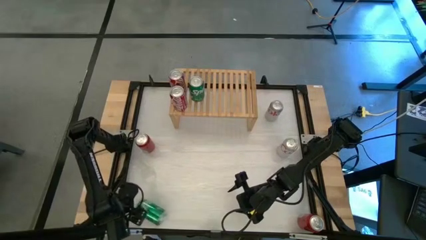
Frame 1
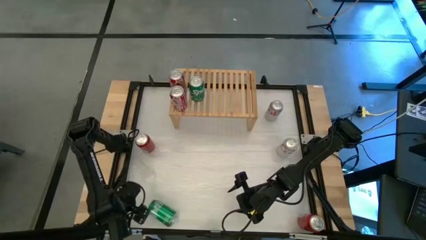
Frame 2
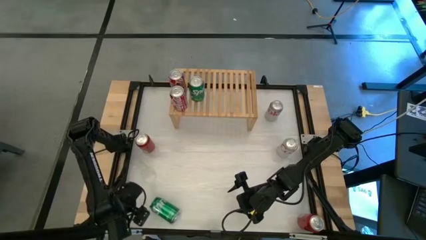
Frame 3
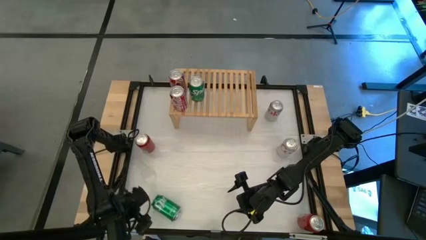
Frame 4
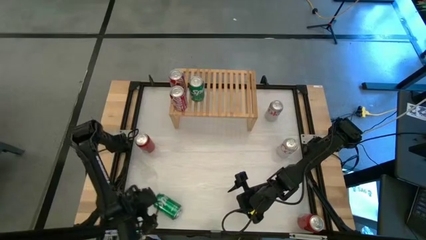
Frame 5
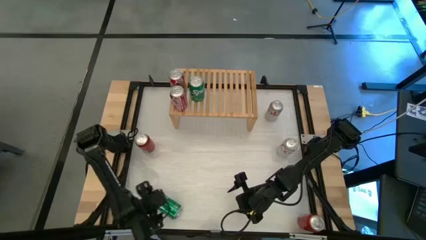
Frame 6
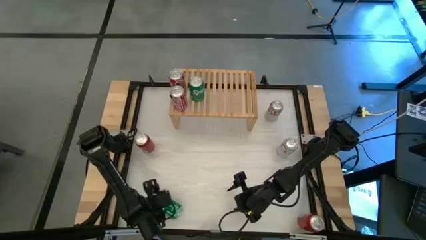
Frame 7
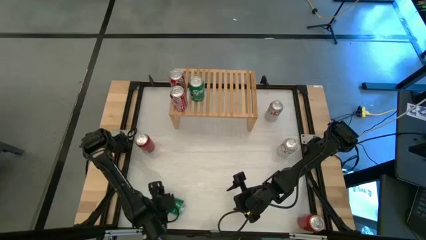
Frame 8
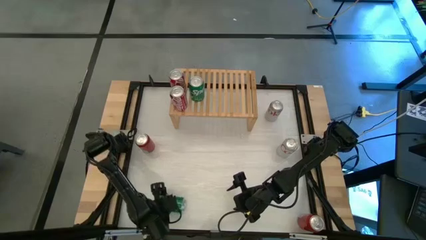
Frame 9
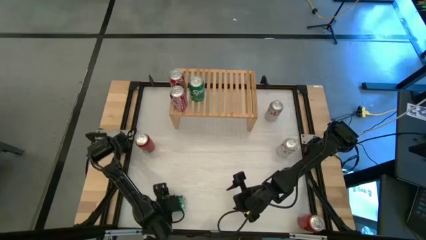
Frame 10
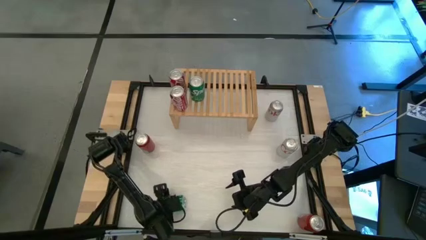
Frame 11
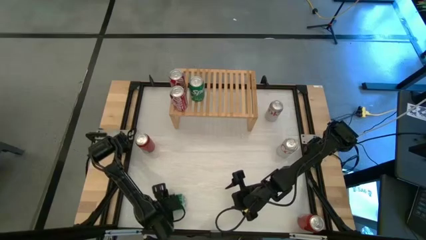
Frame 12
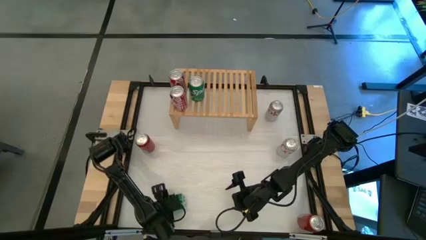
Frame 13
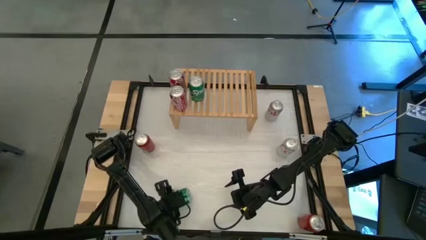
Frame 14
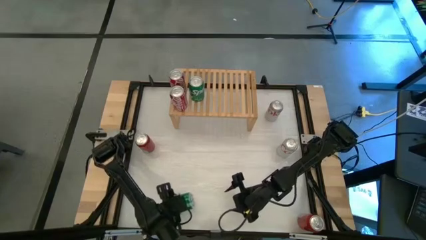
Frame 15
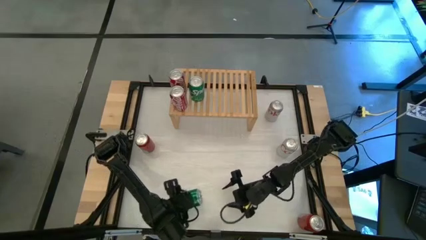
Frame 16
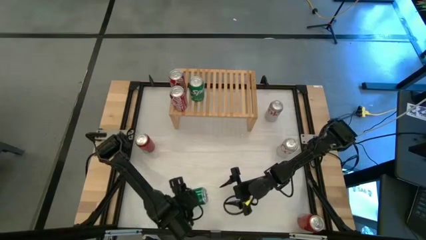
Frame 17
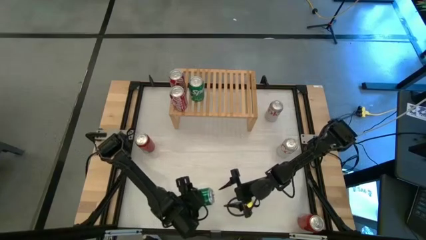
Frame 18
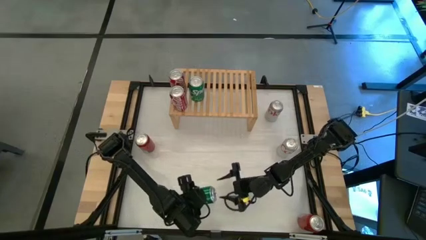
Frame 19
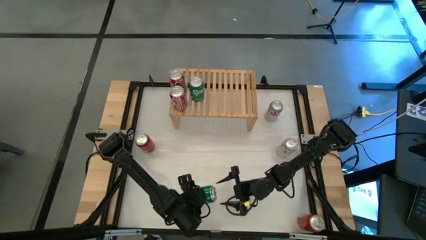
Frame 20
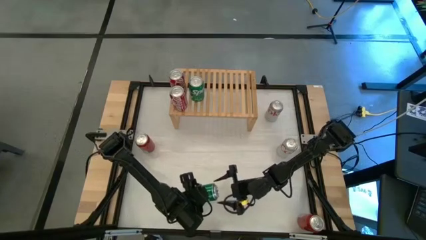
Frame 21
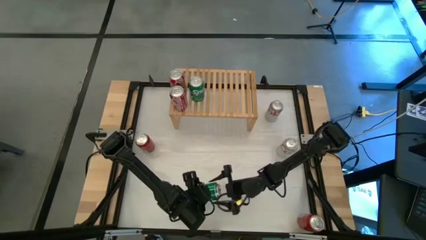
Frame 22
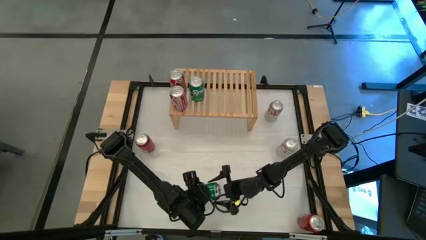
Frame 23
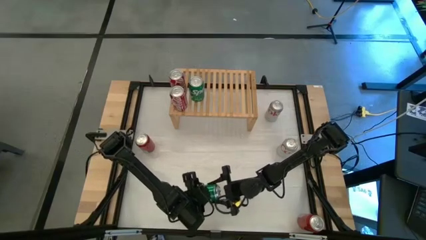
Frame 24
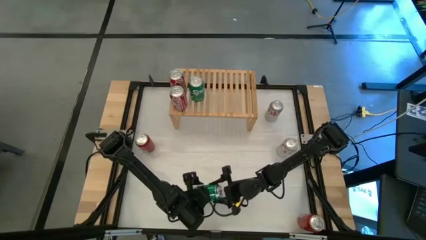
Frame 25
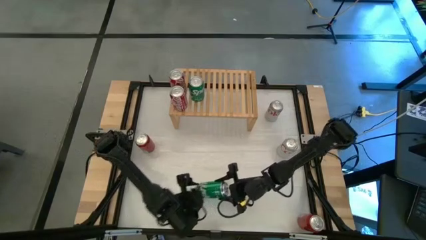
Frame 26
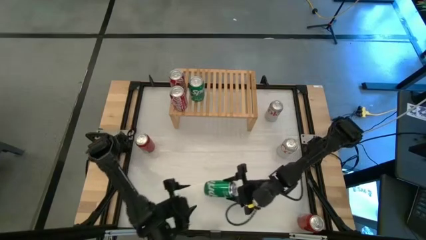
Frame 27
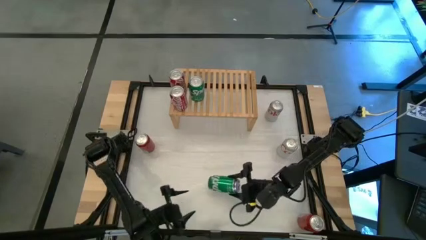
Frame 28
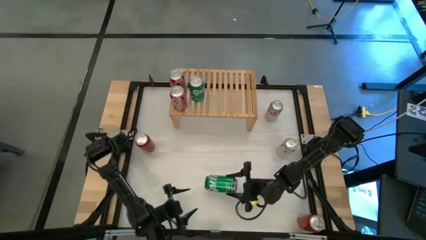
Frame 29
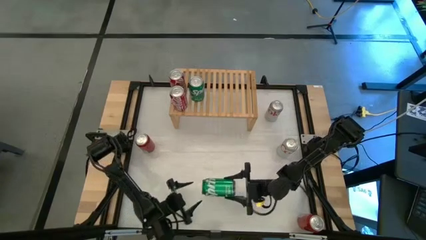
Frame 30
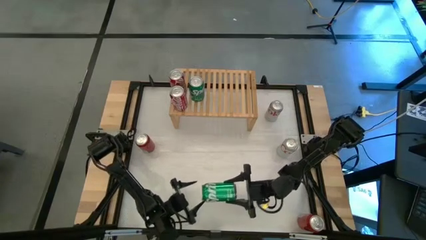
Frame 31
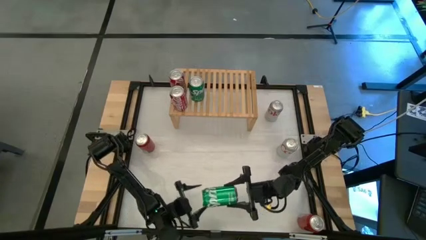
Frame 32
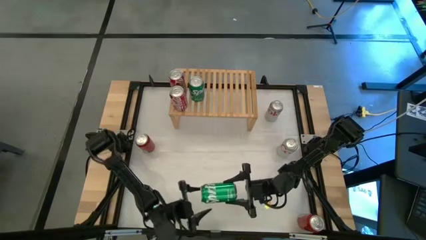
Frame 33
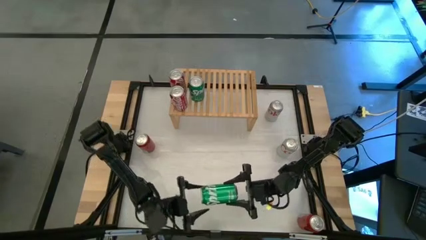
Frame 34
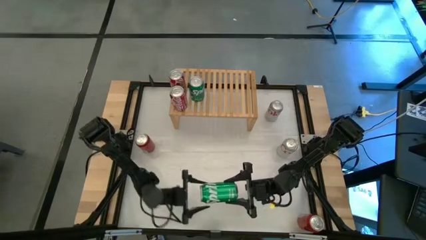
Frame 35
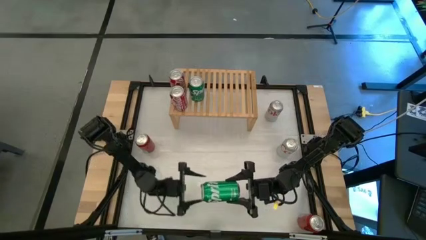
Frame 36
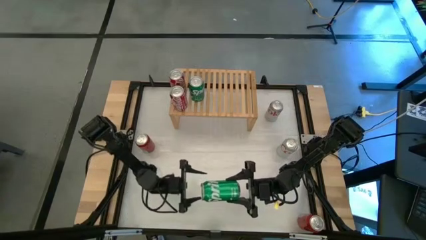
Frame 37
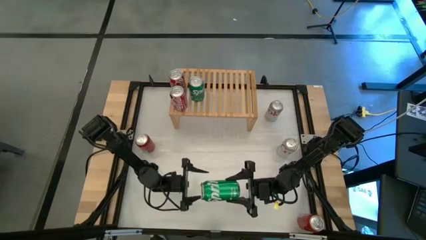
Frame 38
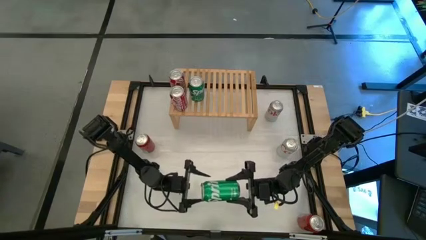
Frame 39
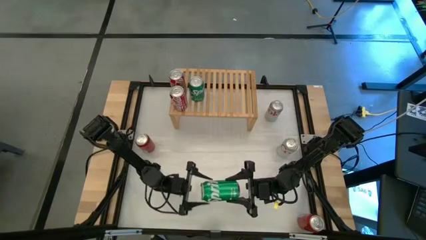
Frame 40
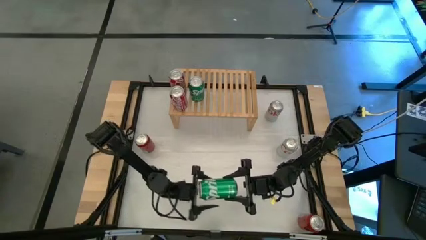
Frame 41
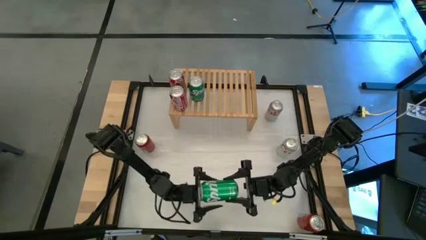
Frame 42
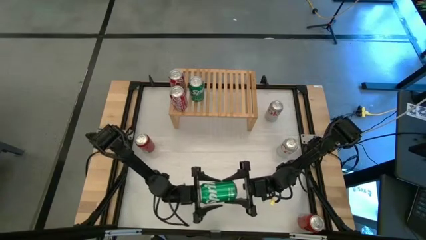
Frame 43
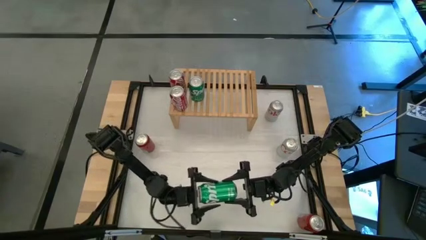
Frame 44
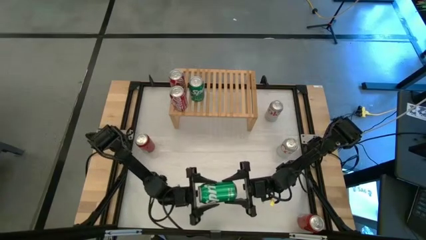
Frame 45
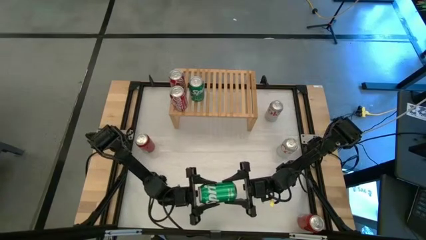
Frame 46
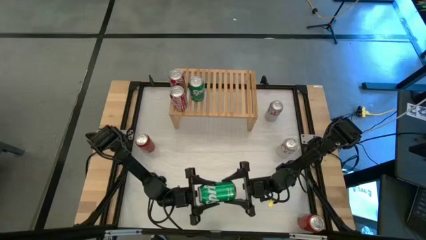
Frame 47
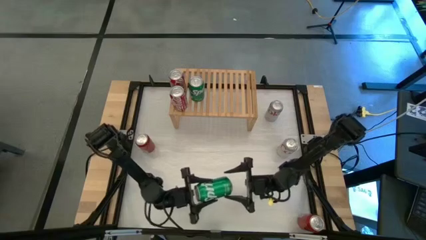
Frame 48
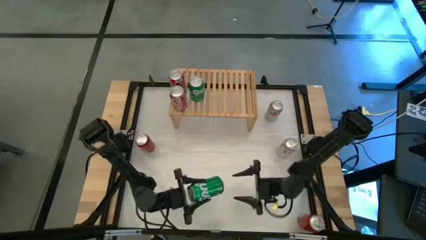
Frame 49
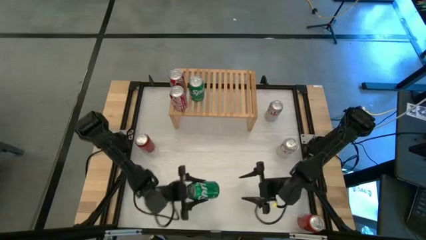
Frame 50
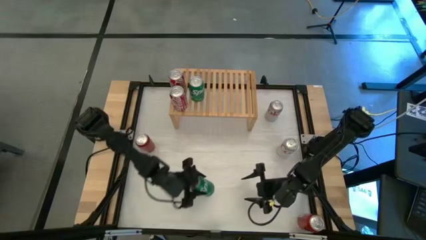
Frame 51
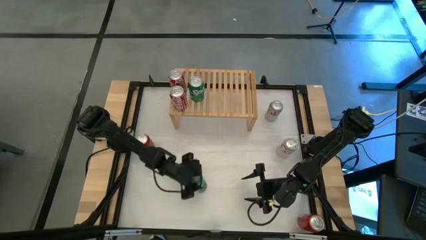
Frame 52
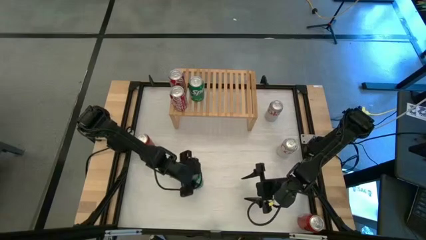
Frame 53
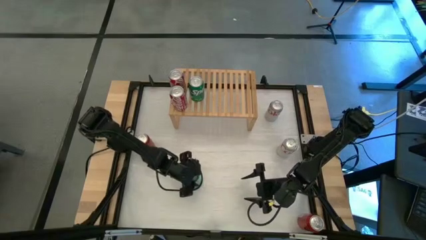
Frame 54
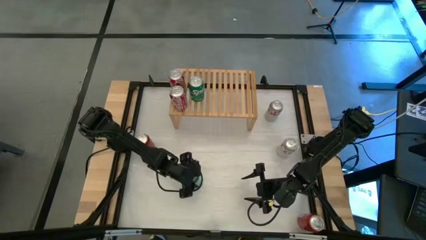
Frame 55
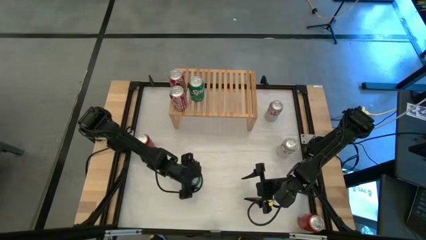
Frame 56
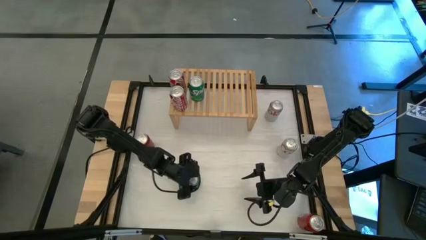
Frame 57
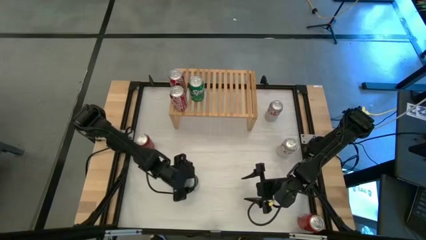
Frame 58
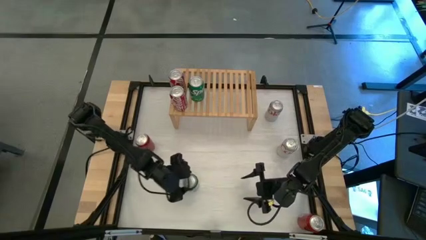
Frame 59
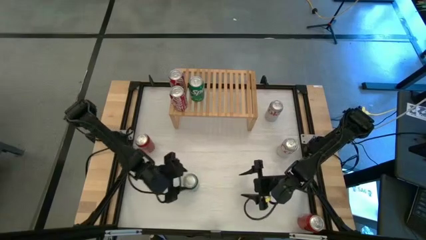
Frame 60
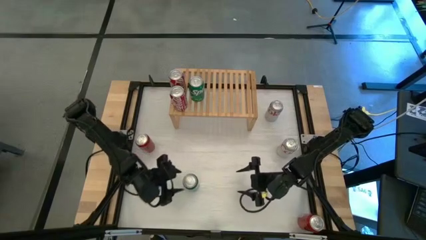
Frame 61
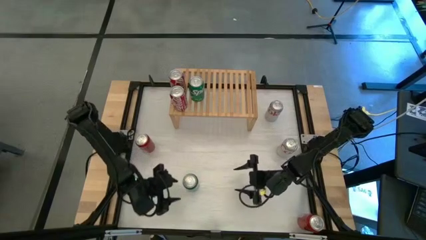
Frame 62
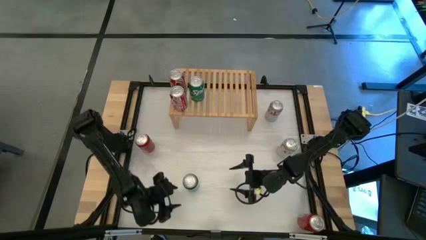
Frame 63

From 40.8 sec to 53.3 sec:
Task: Place canned beverage on shelf
Put the green soda can on the shelf aligned with the other green soda can
